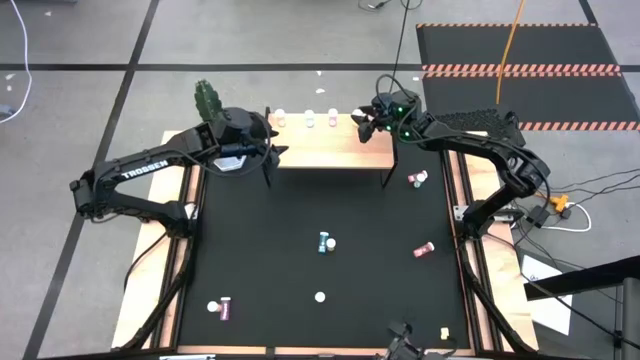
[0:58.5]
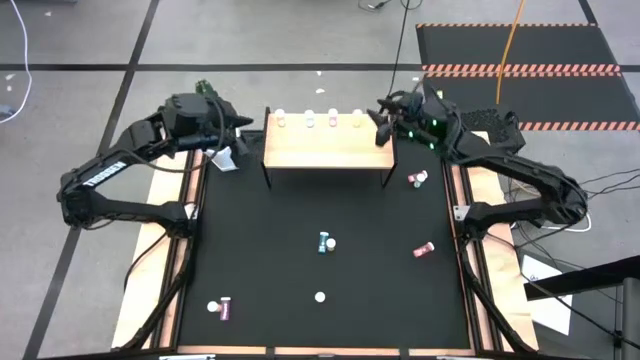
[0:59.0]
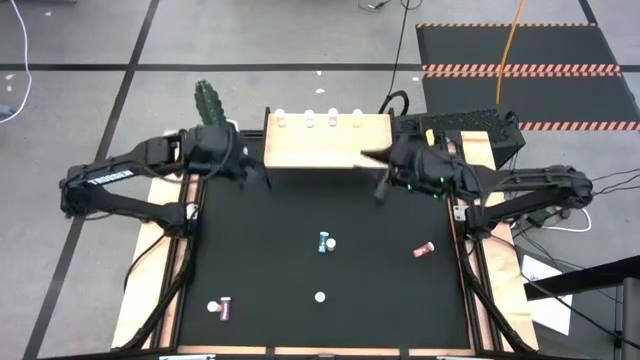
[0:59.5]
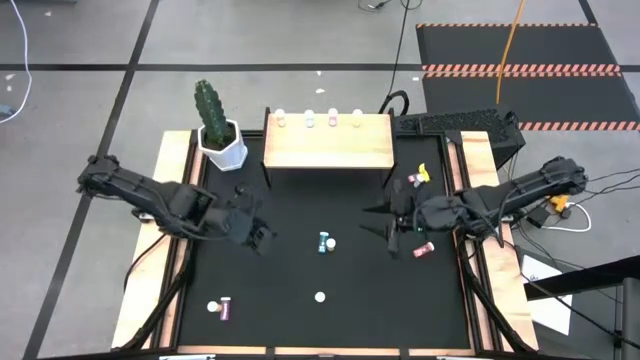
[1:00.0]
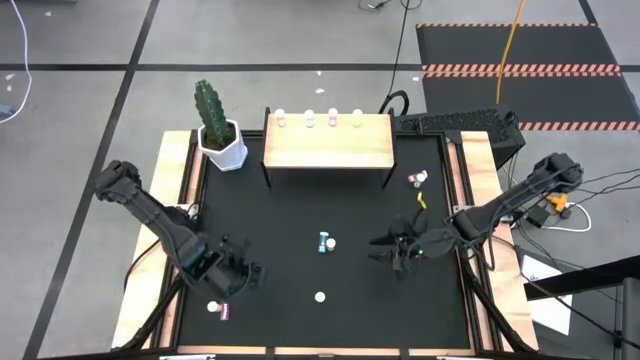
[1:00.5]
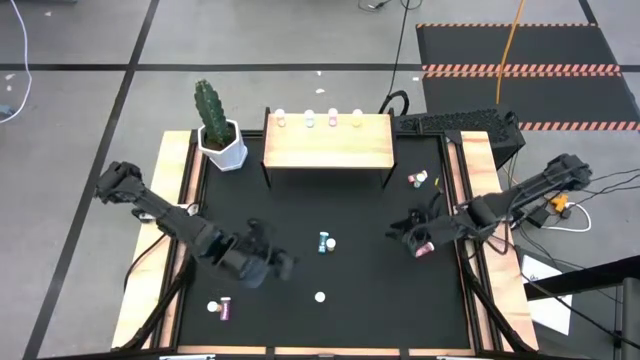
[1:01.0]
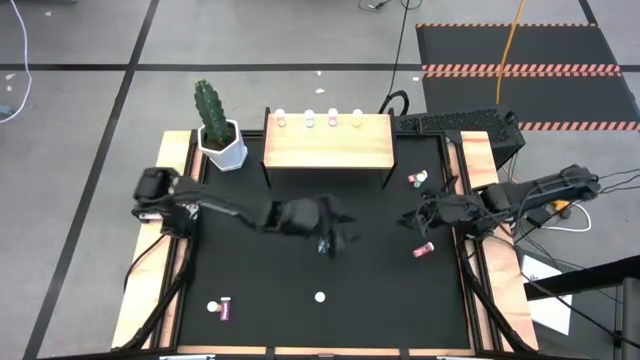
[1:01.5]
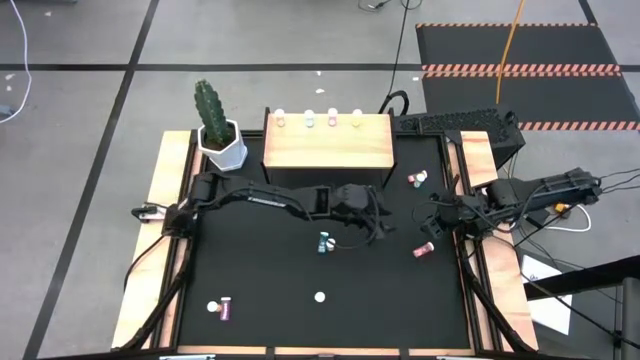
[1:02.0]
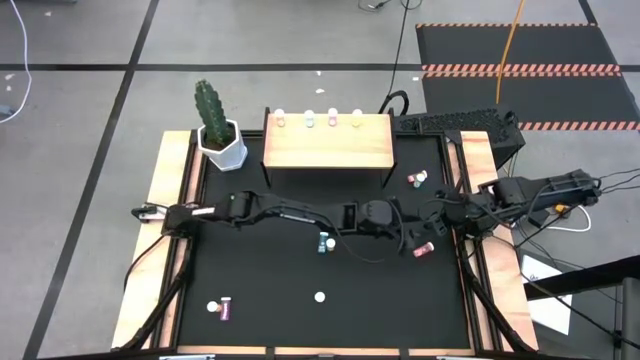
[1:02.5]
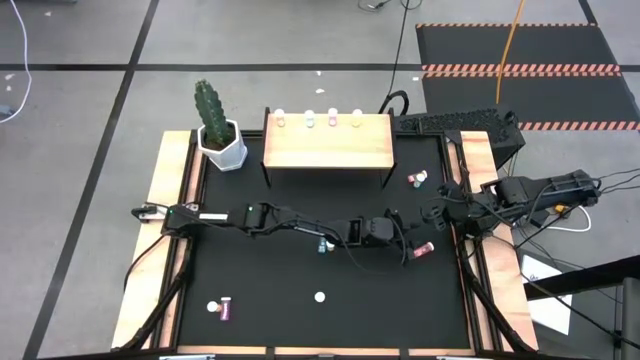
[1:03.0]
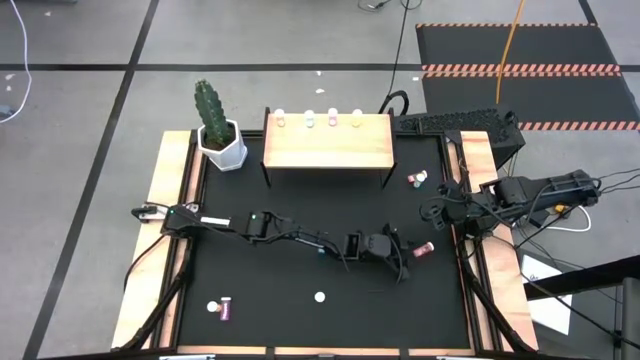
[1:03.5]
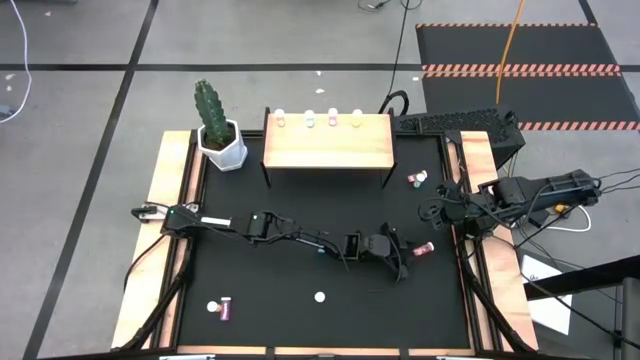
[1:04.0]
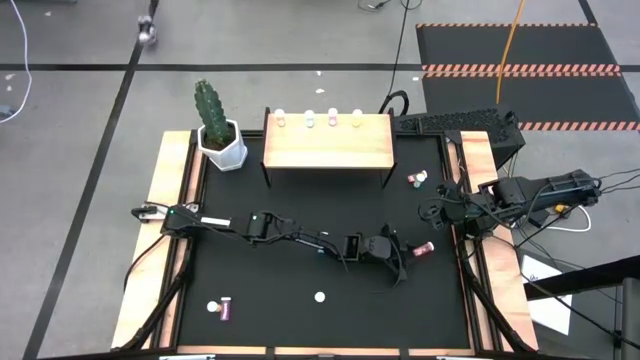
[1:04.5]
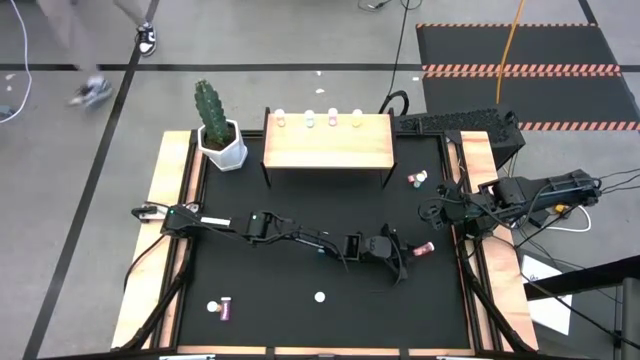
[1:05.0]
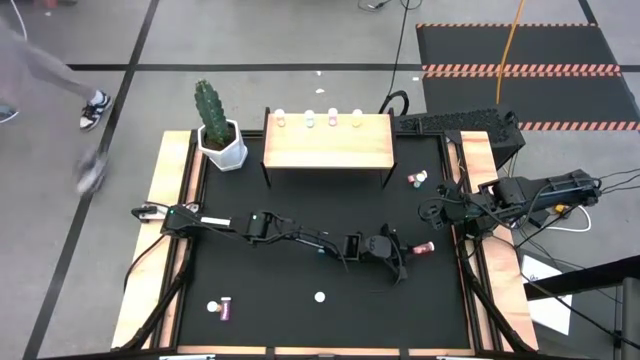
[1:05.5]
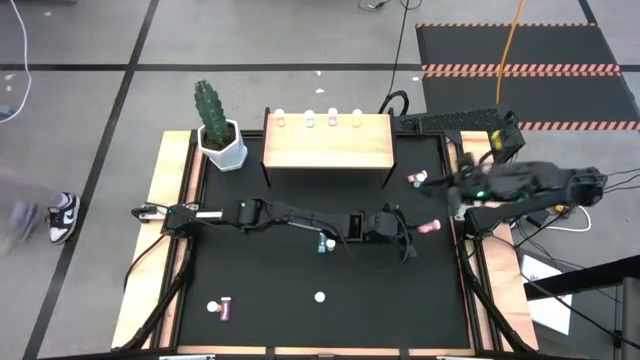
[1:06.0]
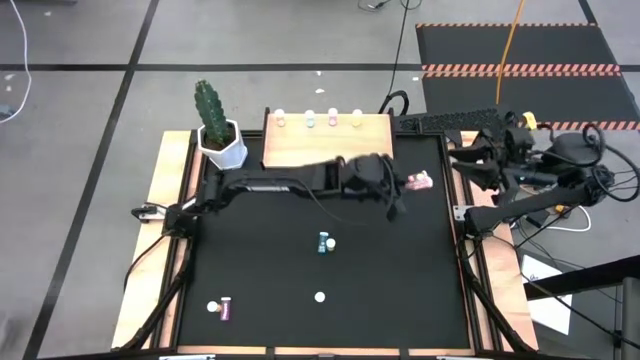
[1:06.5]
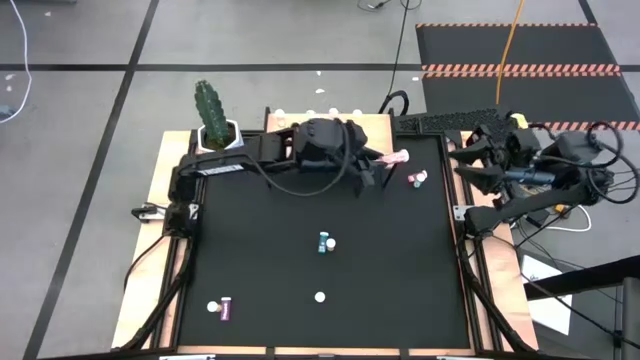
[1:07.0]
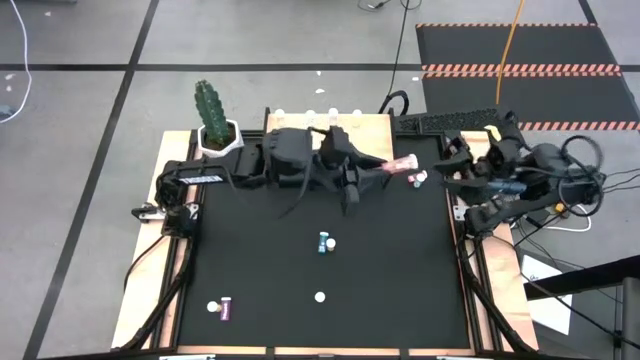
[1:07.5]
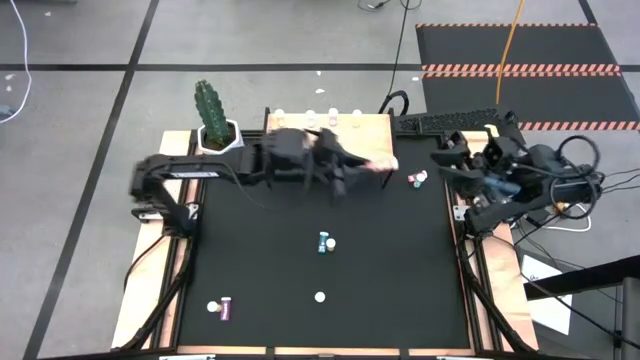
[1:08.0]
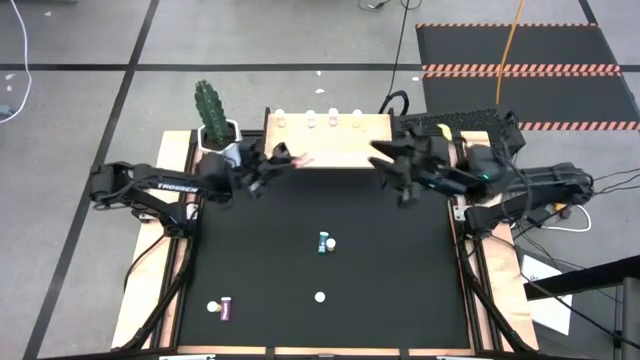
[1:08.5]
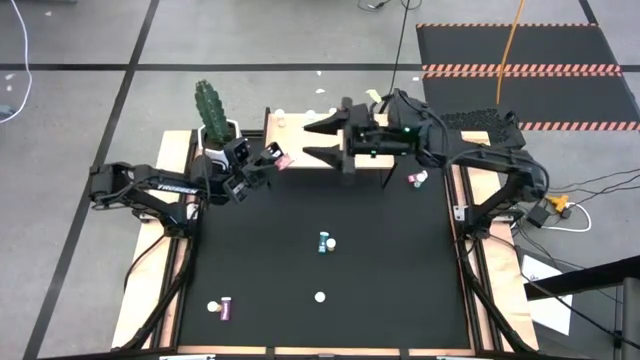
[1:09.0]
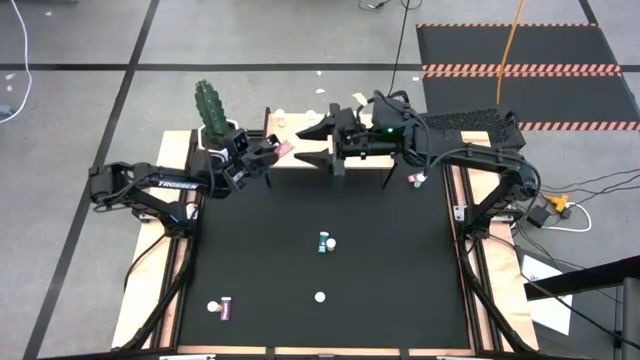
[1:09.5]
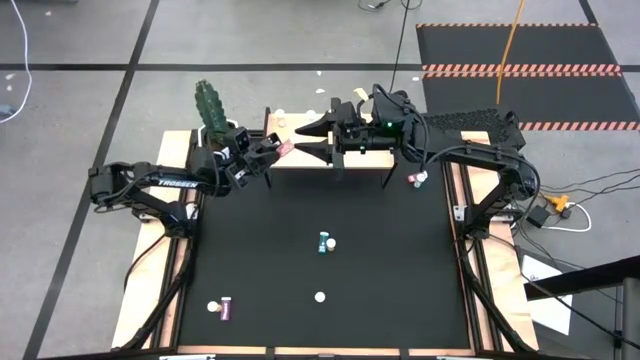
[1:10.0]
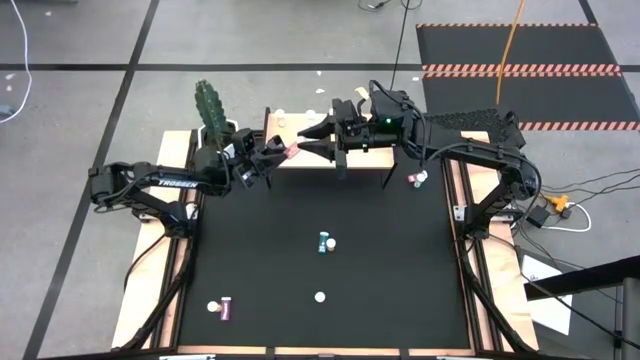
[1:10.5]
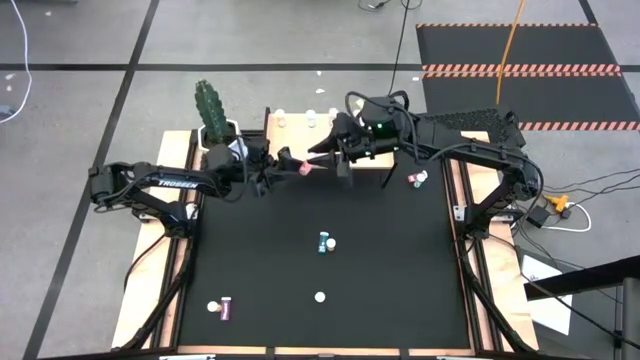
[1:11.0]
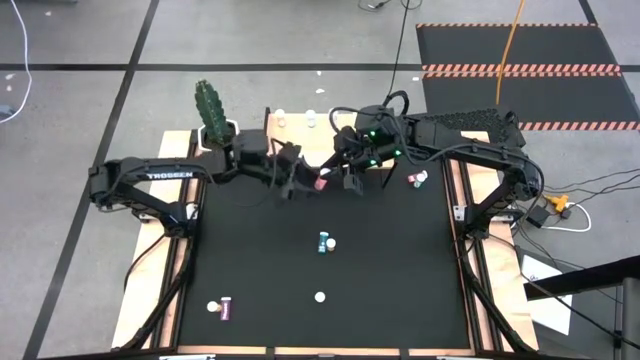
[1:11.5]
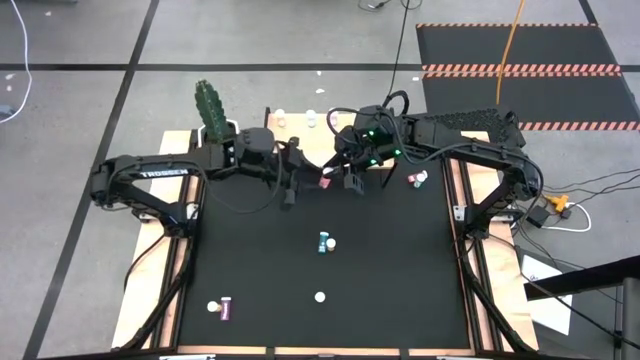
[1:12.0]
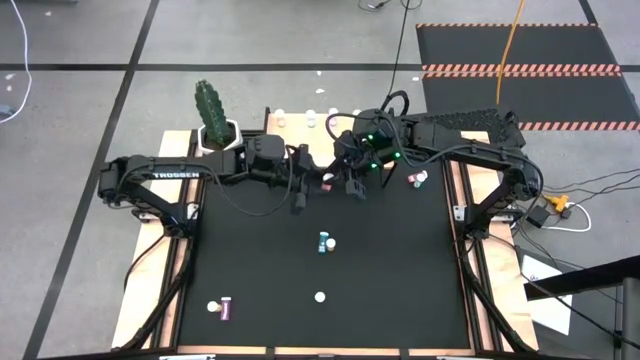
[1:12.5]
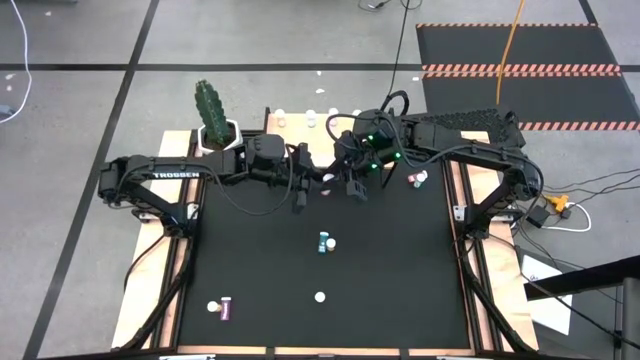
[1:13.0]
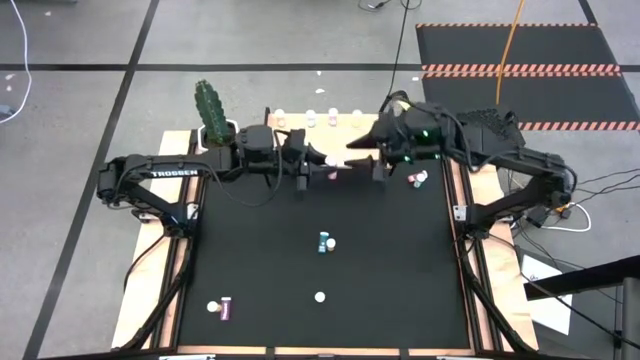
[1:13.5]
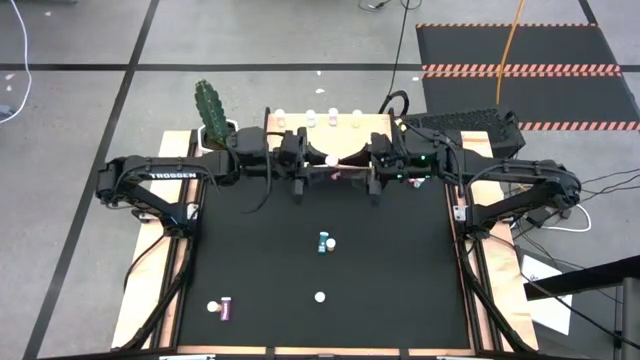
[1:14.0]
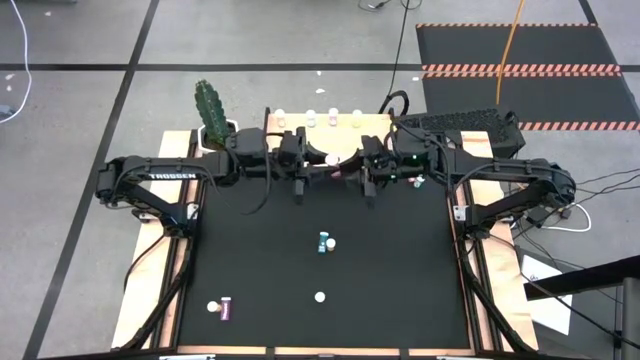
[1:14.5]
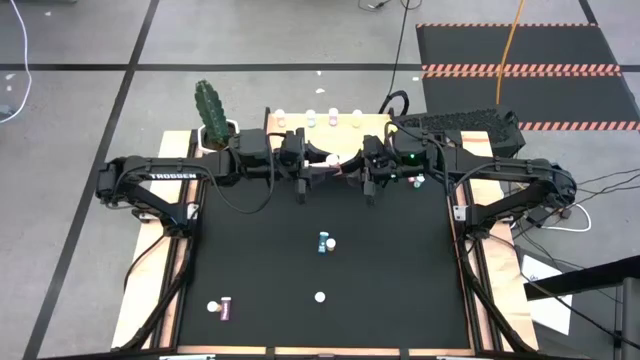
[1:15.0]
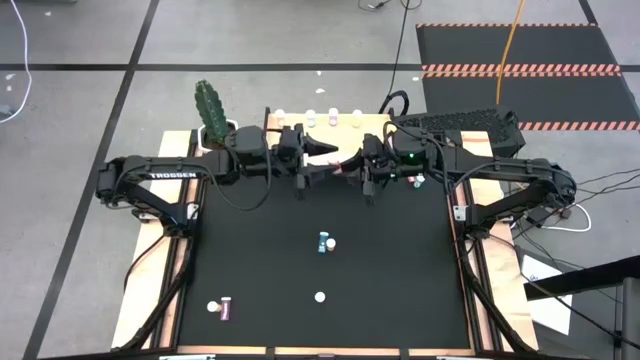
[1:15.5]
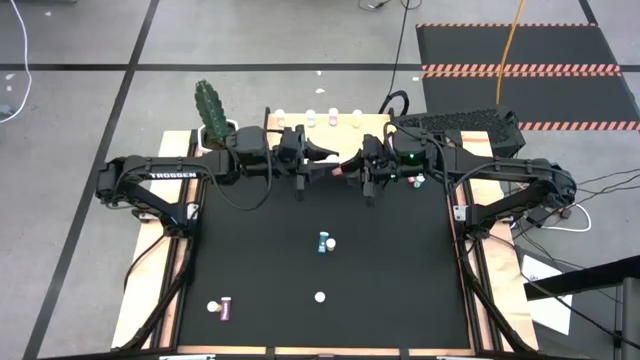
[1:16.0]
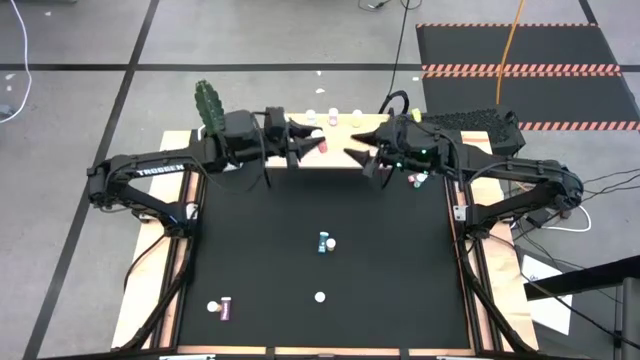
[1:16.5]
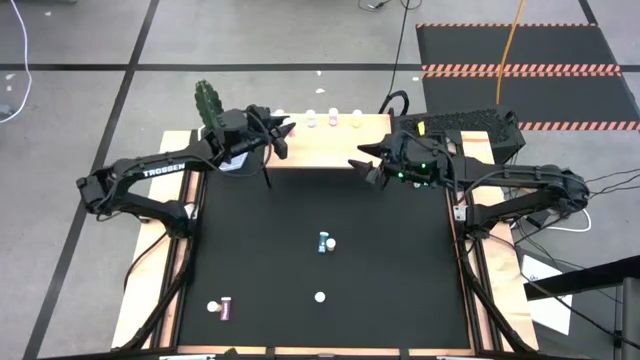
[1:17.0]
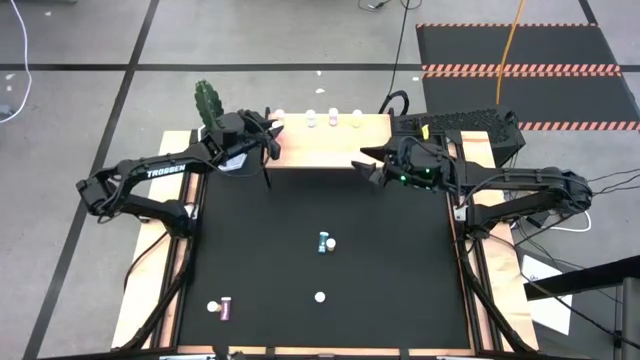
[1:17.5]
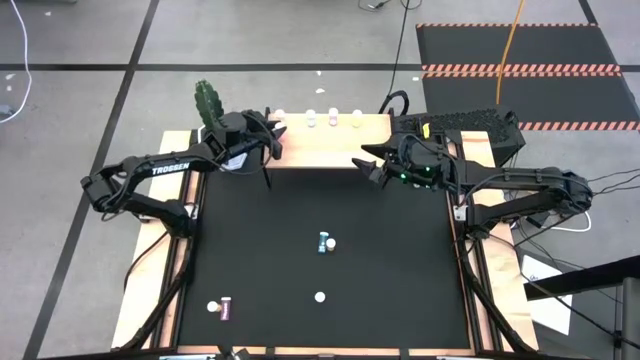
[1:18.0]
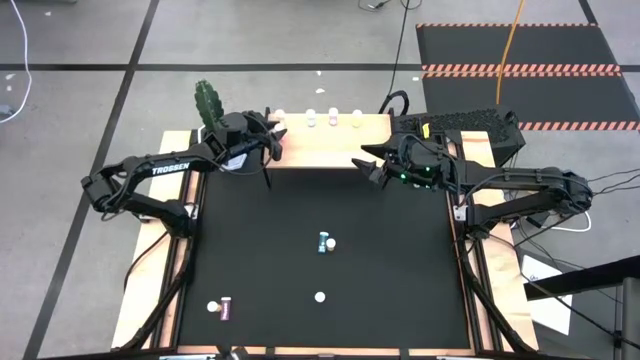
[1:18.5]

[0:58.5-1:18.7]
Task: Pick and place medicine bottles onto shelf by color
Put the bottom orange pill bottle aligned with the other orange pill bottle on the shelf

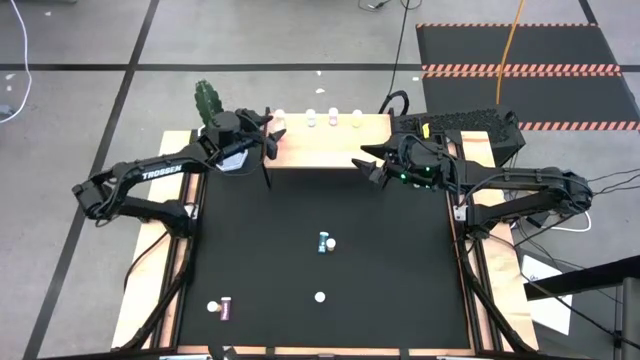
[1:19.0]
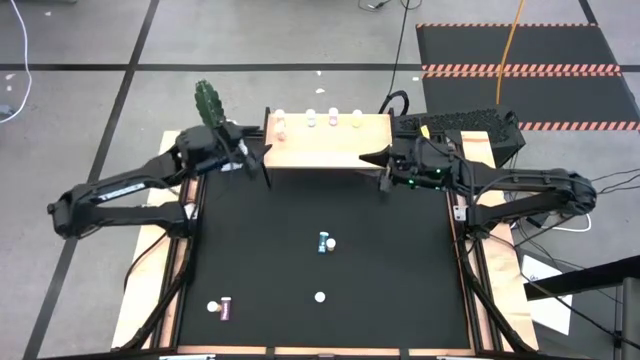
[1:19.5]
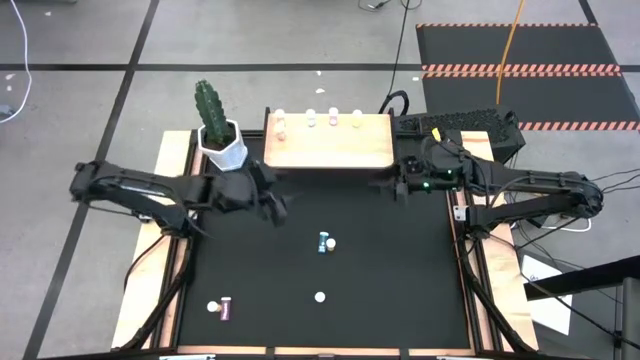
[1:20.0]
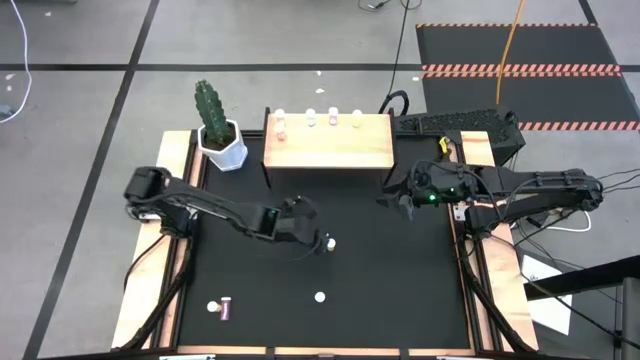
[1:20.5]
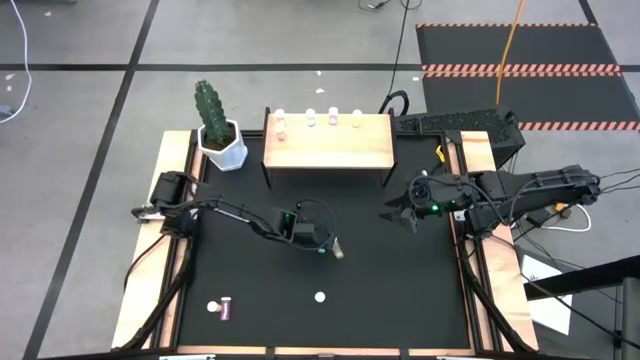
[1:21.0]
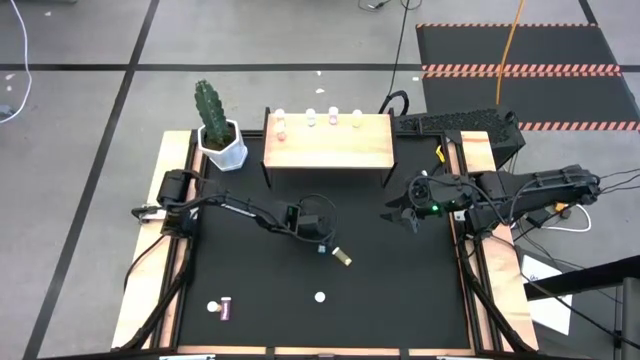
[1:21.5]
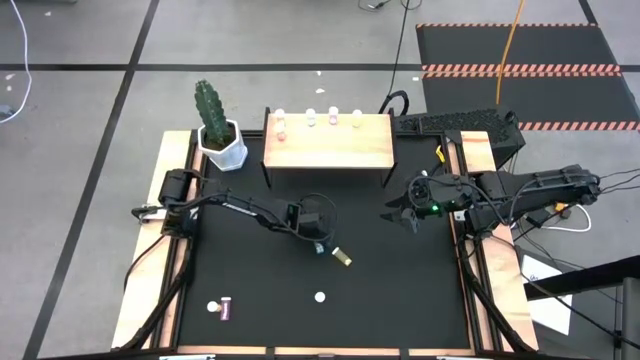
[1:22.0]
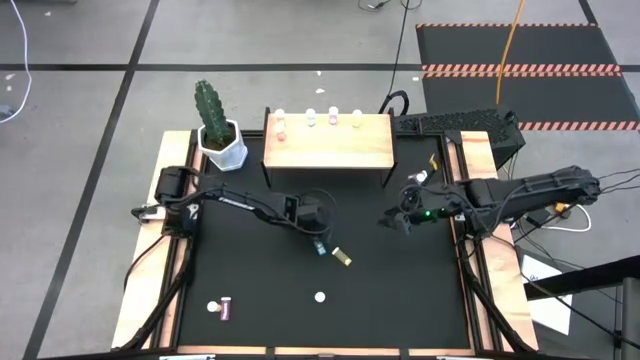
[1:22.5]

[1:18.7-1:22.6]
Put the bottom blue pill bottle aligned with the other blue pill bottle on the shelf
